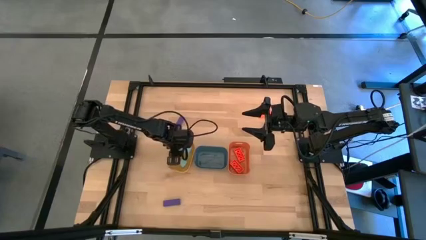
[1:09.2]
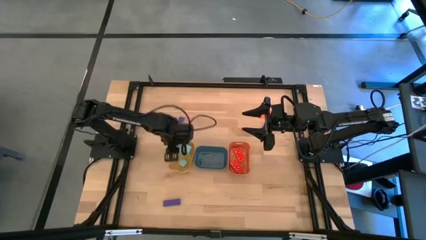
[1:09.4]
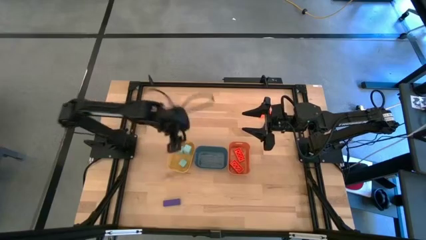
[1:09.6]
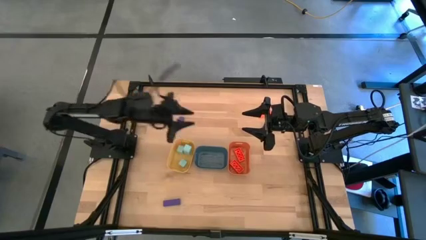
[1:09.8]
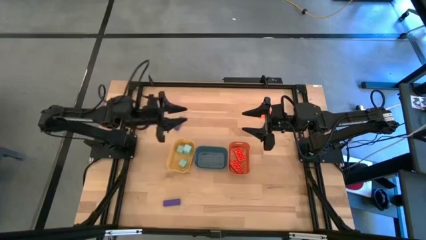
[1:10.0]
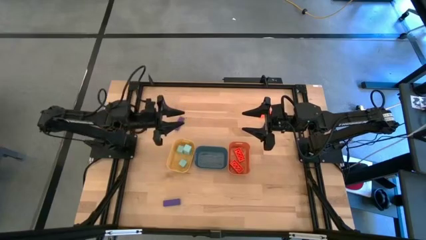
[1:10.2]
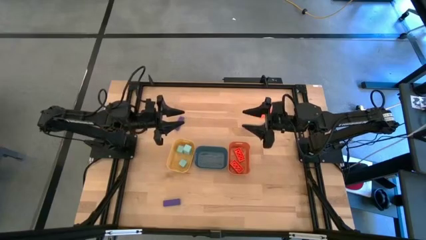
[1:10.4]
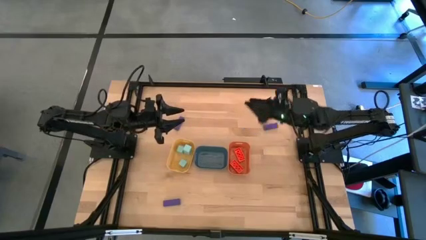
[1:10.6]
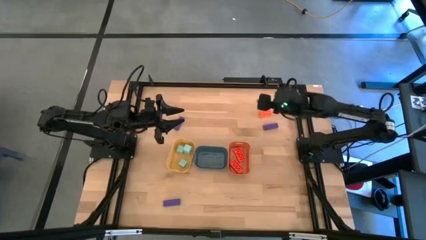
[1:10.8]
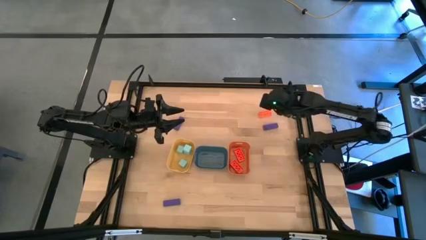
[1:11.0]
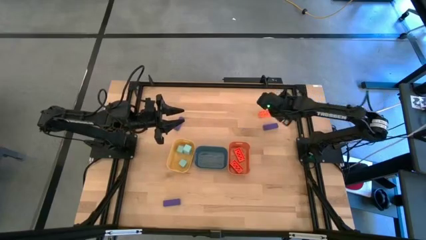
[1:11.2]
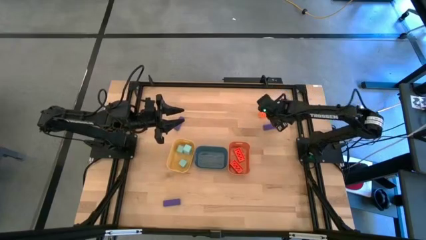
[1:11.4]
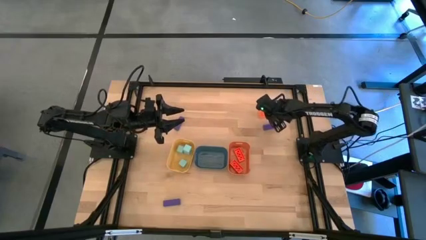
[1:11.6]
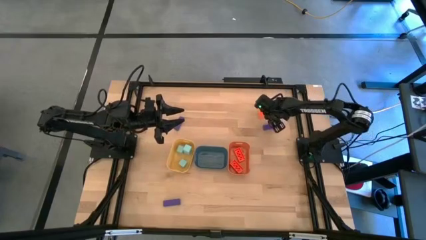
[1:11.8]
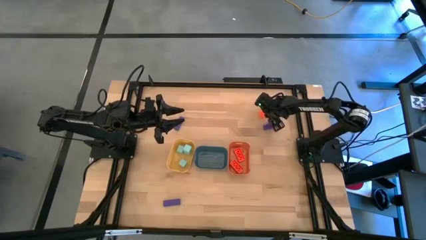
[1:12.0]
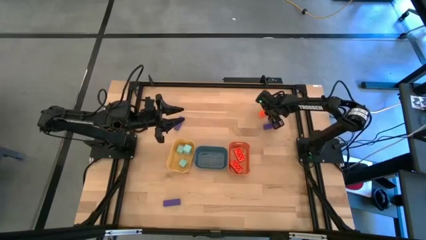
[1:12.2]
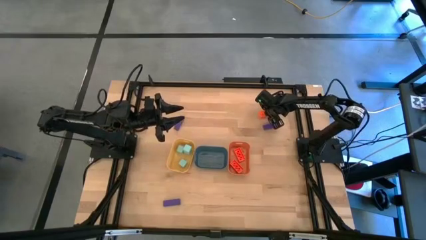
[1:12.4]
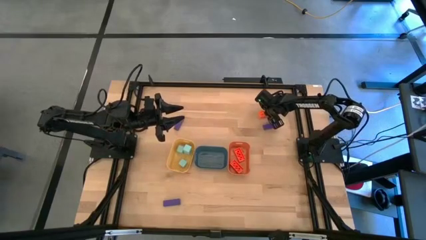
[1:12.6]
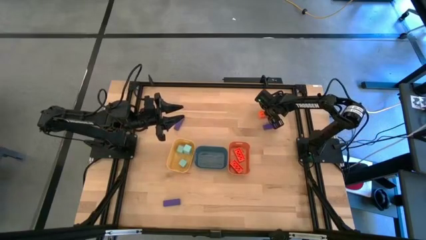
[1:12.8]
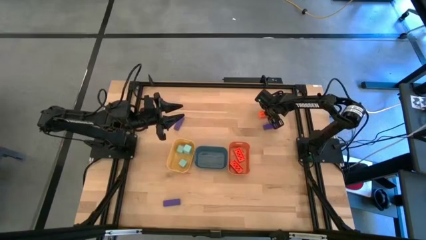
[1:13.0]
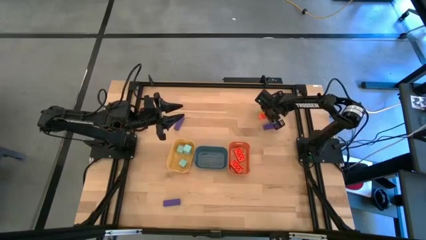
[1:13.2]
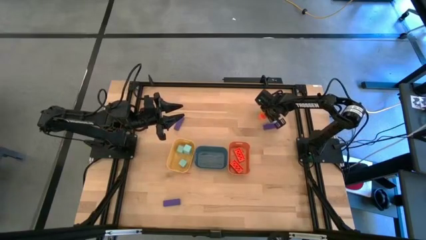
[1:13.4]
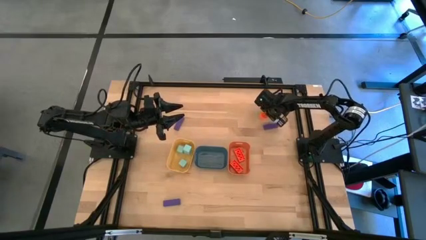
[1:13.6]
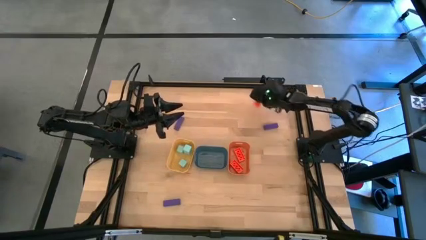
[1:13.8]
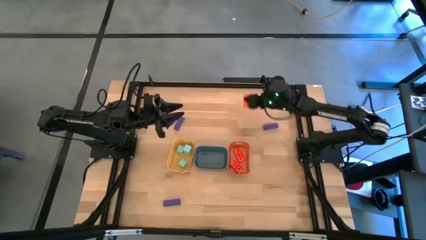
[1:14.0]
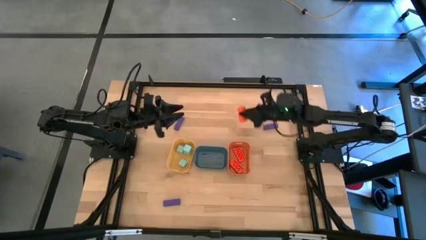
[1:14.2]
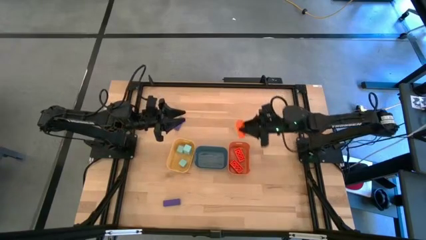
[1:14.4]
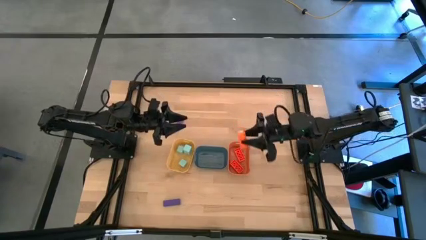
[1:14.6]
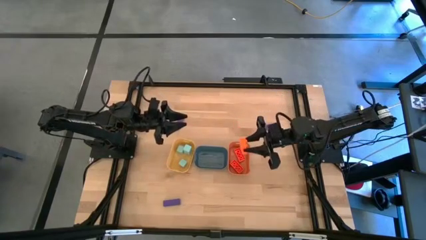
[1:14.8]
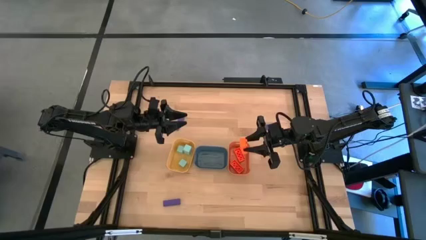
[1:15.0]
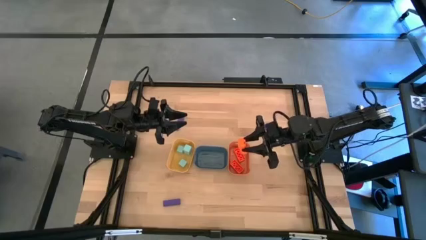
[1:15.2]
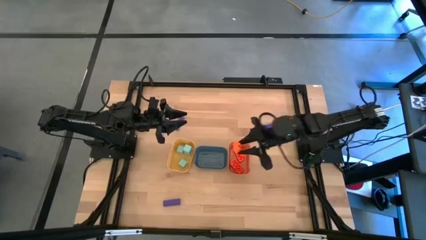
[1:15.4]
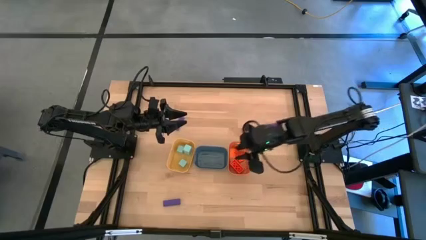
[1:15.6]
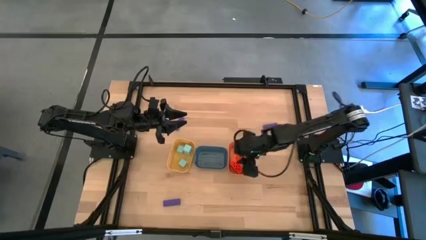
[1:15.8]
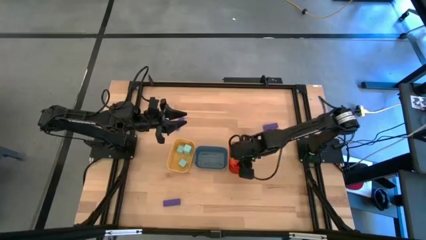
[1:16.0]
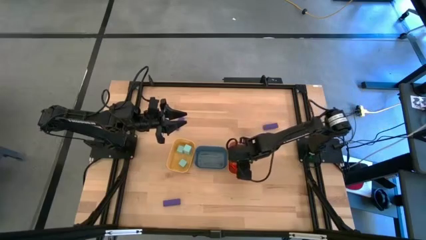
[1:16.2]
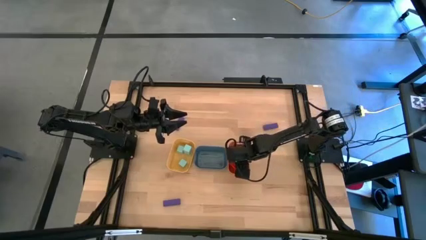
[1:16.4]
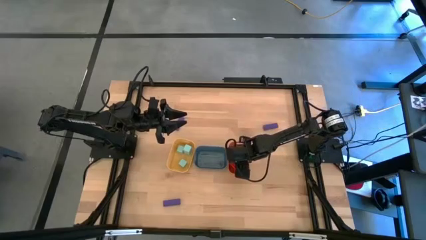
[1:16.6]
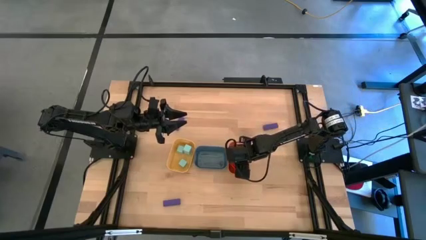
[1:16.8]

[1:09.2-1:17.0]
Task: Sort & place blocks by color
Put the orange game piece into the orange bin

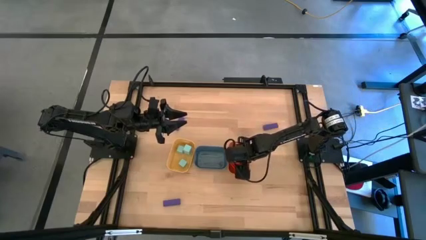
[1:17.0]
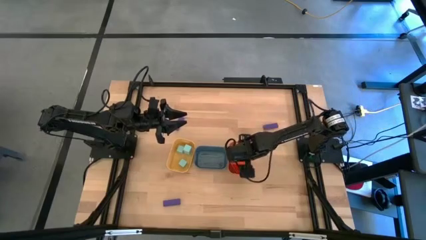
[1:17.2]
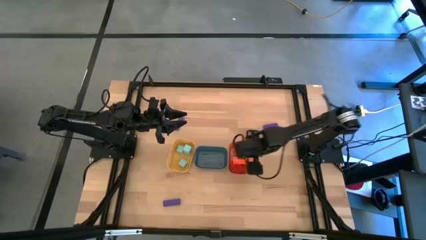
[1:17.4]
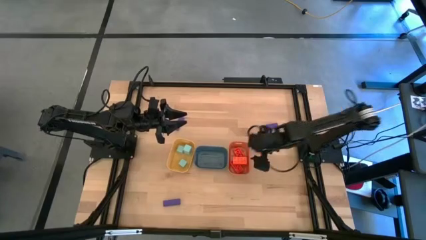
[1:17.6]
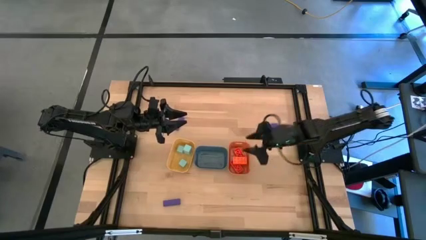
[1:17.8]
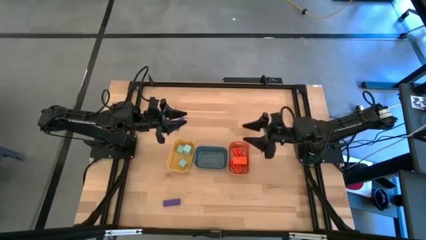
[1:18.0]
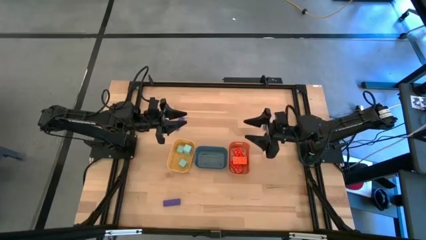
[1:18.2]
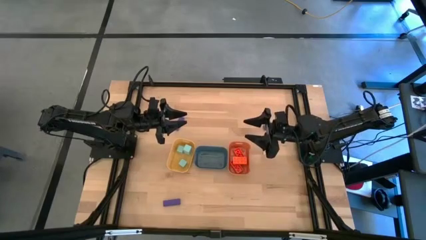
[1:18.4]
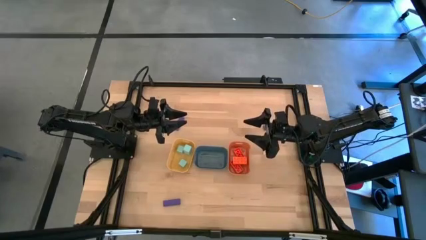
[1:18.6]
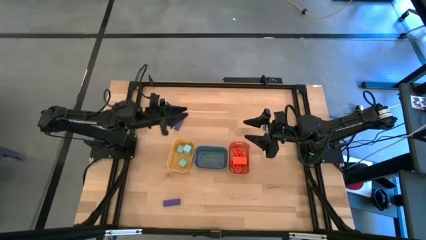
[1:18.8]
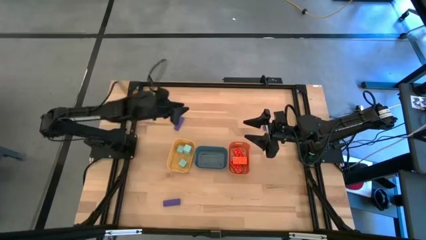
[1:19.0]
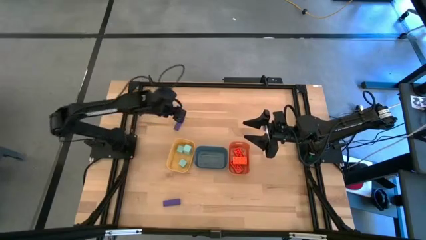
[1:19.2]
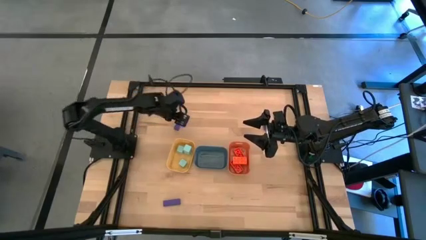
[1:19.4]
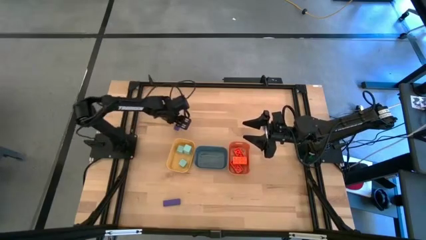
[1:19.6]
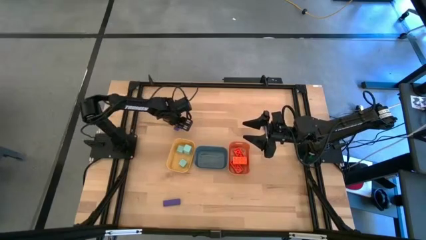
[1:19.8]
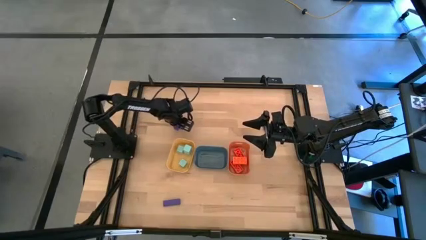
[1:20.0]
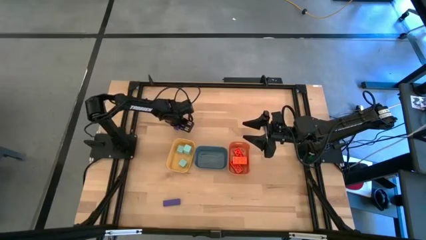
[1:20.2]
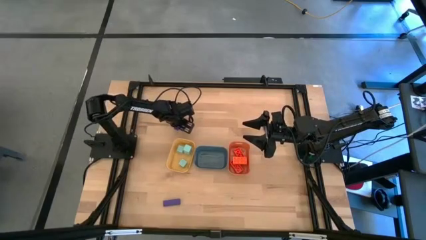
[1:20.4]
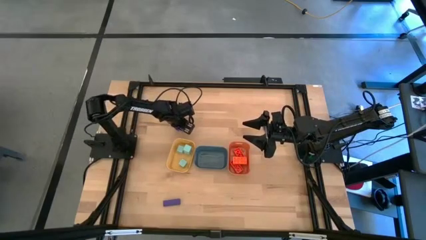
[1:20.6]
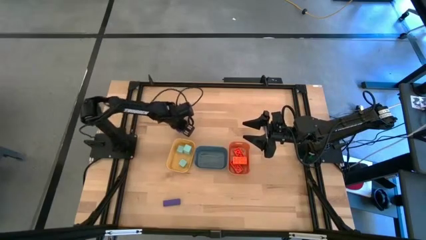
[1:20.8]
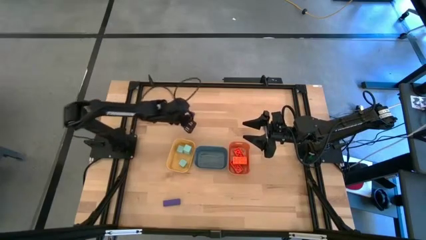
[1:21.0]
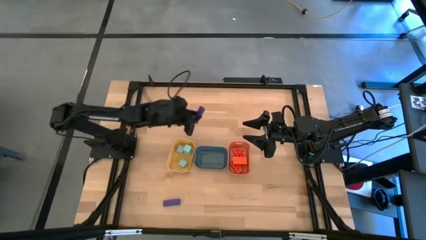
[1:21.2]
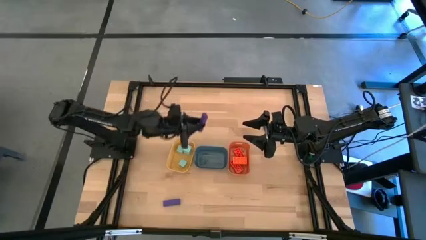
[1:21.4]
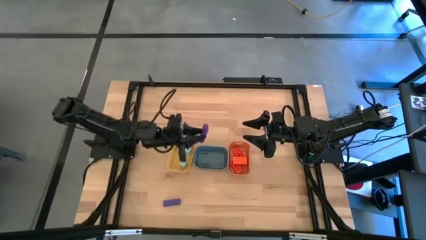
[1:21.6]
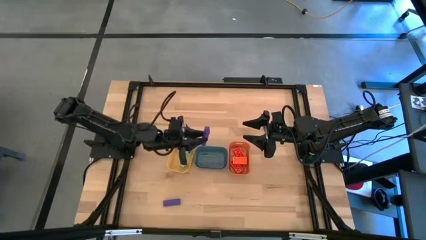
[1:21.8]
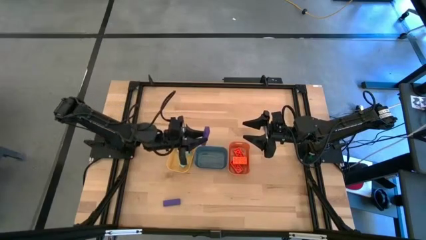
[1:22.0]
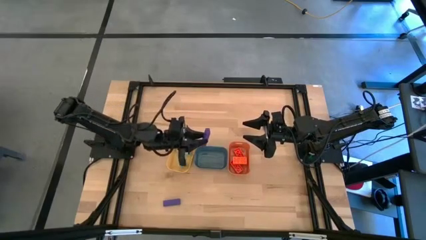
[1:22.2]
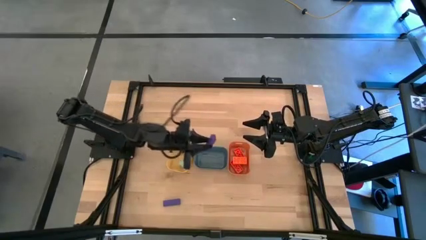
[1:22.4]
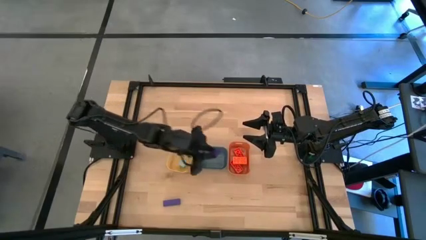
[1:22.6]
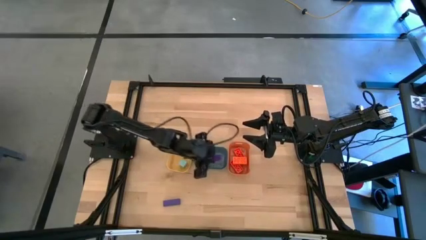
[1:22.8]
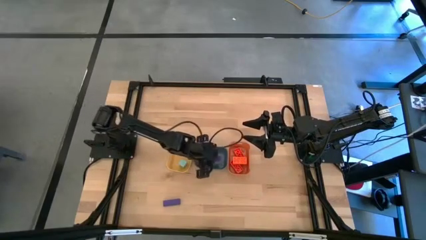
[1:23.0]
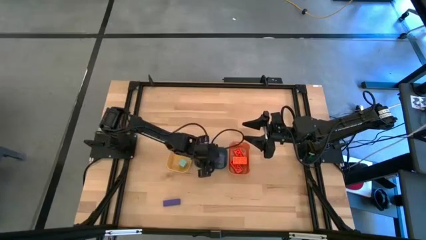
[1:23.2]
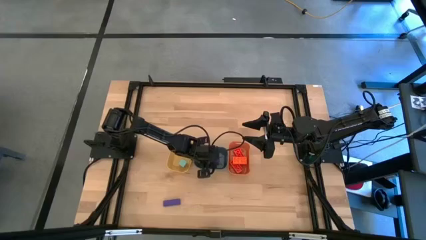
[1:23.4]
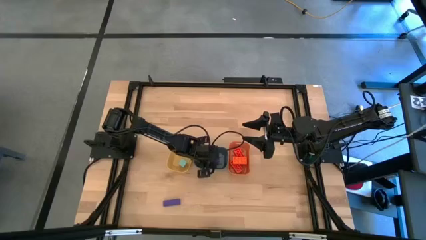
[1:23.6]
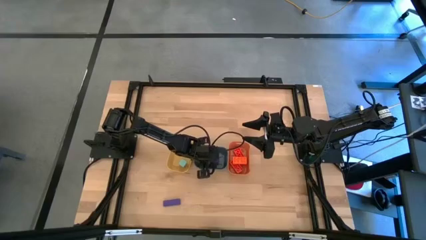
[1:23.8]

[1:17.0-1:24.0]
Put the top left violet block into the blue bin

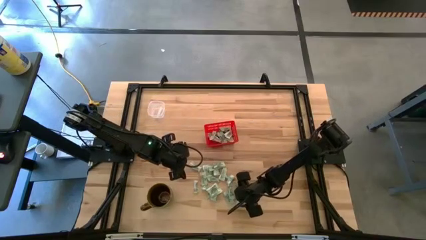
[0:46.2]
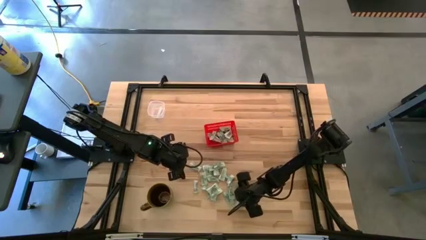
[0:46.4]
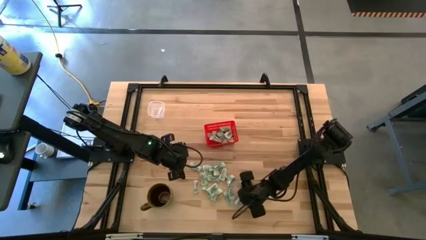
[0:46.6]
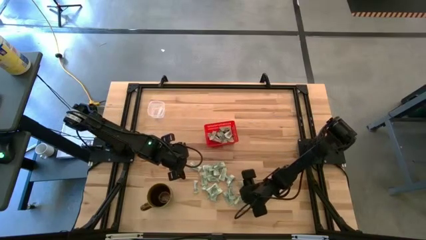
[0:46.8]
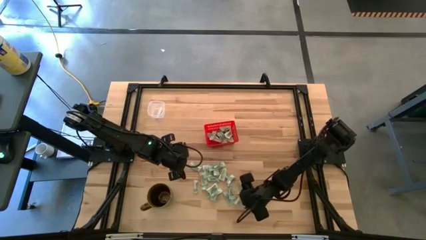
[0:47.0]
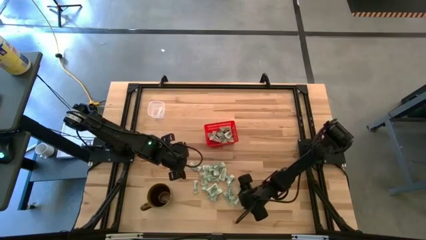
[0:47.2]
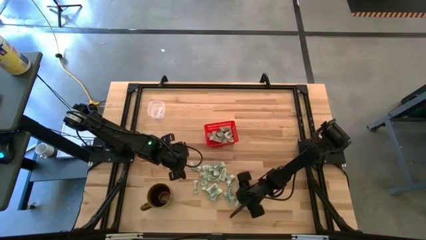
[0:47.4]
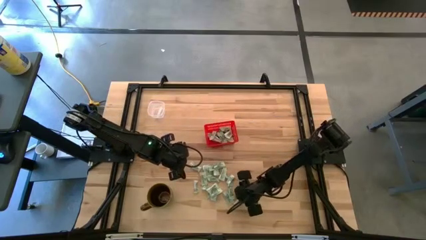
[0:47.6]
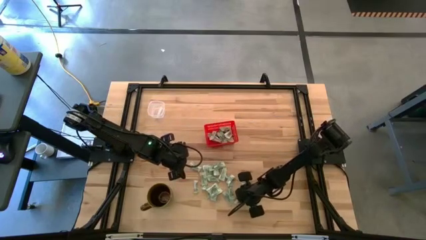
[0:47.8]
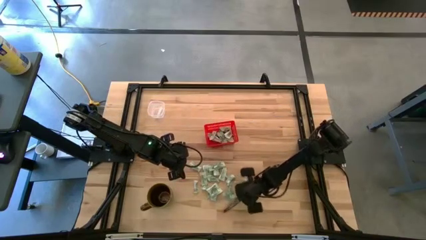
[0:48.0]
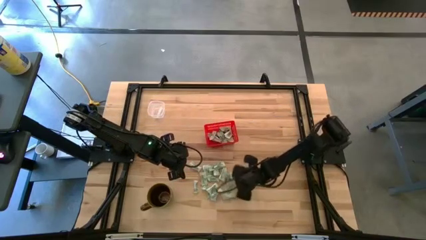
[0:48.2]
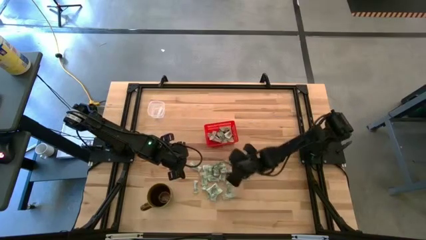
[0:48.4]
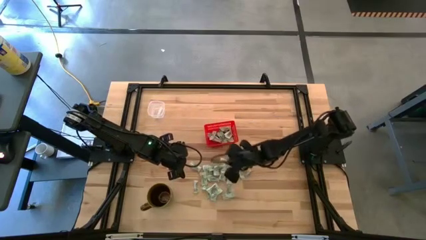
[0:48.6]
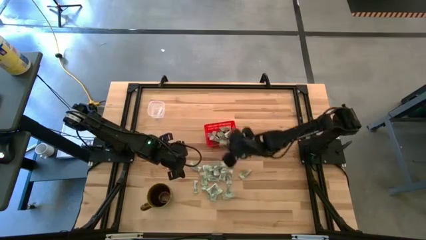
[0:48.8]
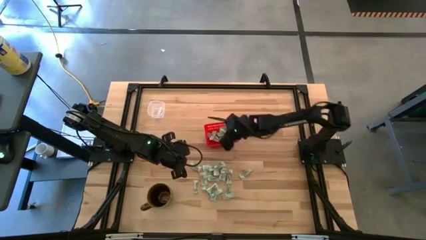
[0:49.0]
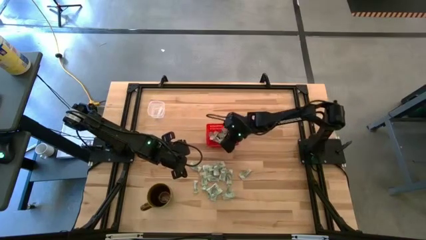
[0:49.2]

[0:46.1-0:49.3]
Task: Pick and place items into bin
Put the green stevia packet into the red bin
